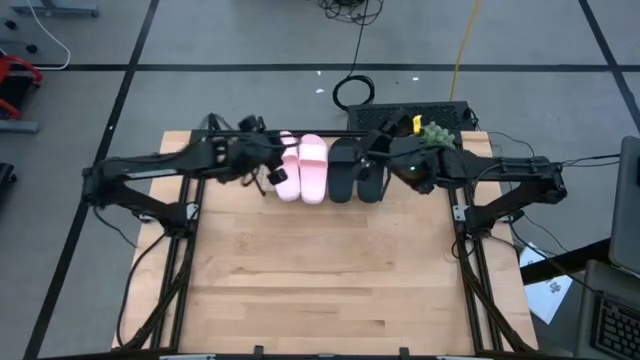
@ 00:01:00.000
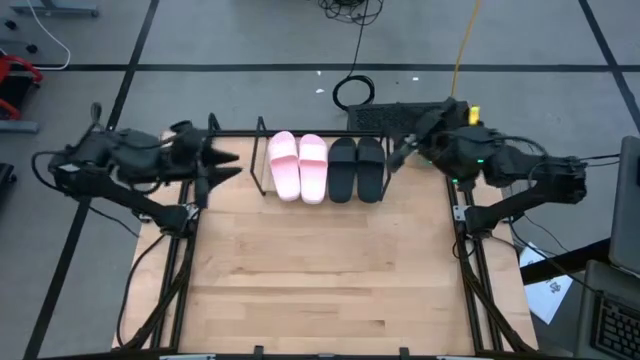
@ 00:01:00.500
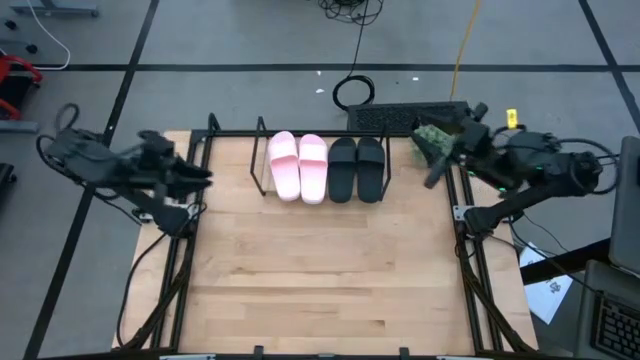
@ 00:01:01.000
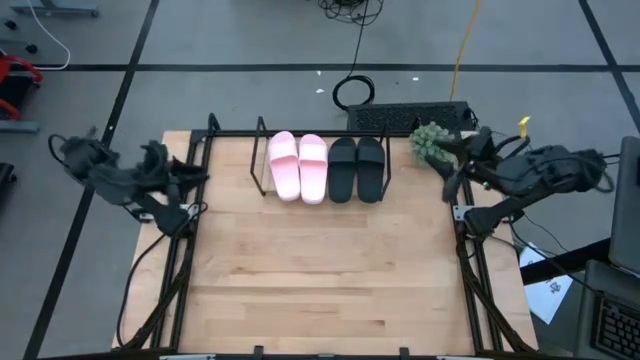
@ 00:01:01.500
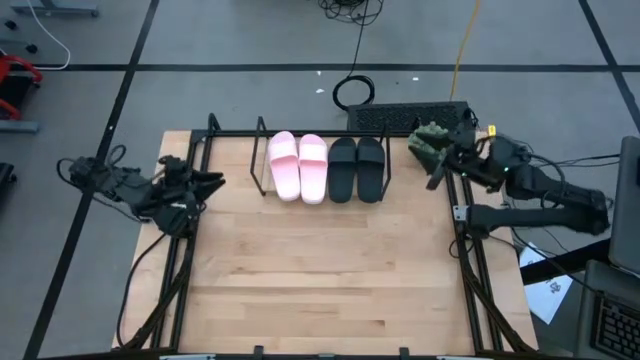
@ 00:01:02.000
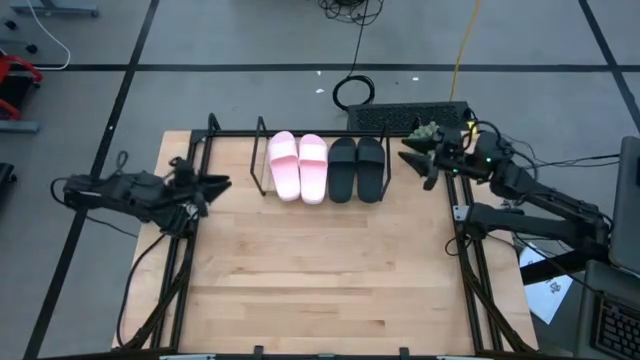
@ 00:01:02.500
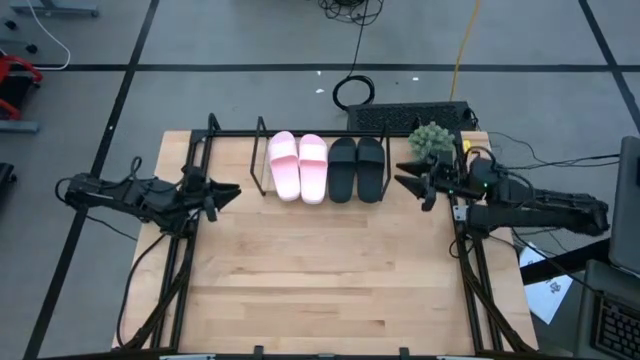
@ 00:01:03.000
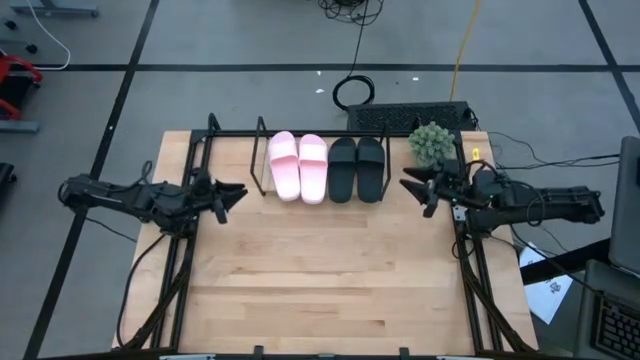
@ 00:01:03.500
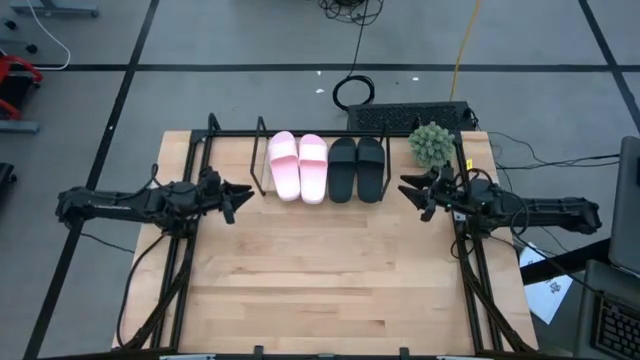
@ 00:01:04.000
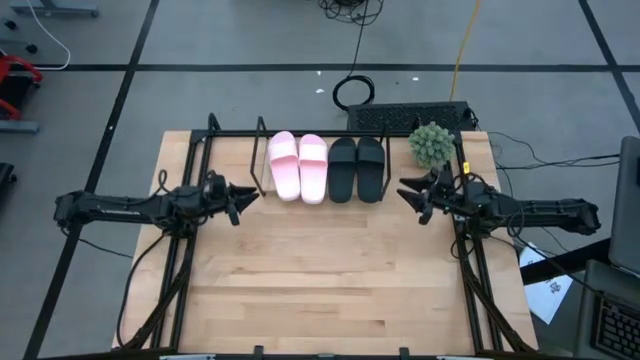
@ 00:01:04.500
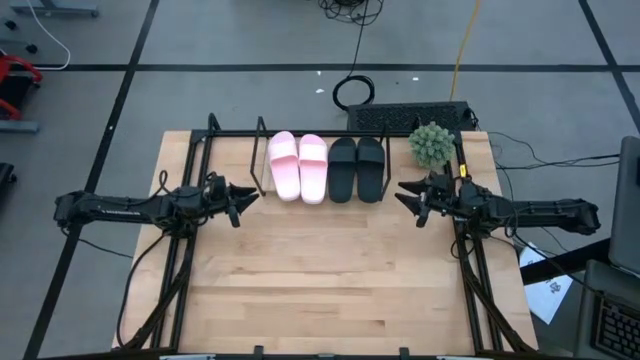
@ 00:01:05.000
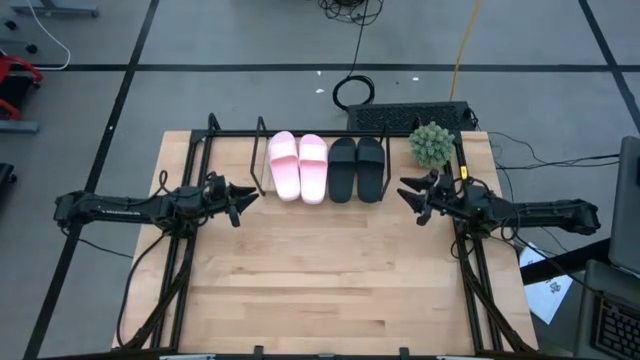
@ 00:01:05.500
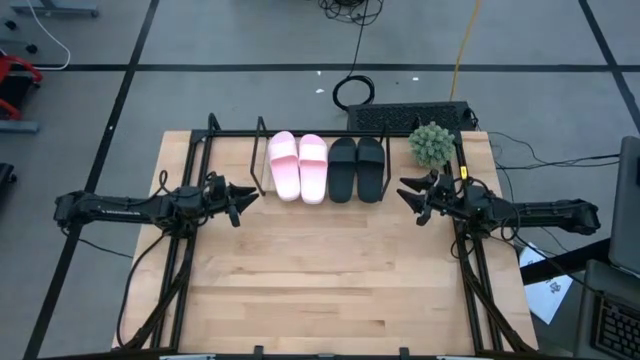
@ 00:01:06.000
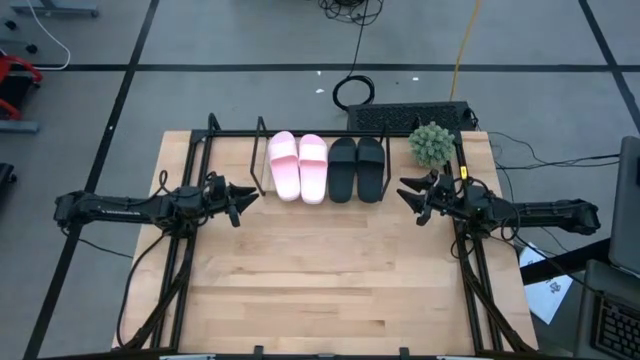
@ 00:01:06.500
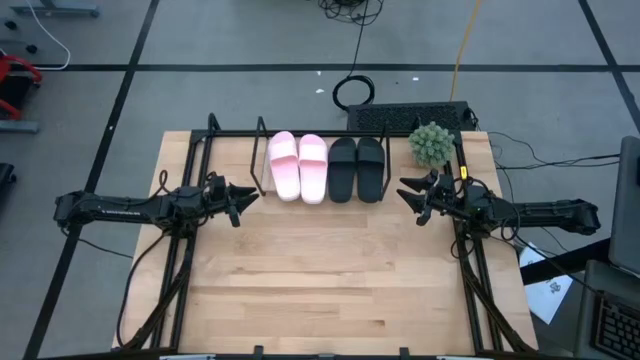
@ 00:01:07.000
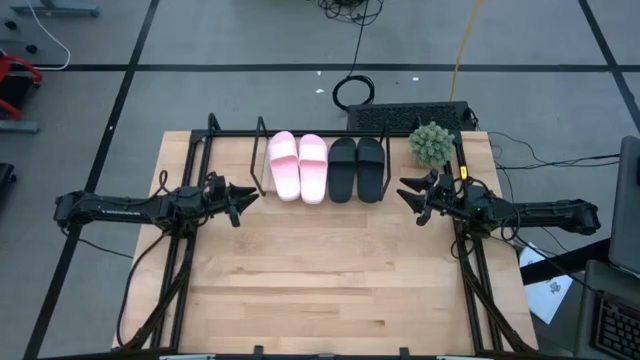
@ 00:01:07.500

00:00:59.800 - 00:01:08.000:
Task: Pick and place slides into the shelf
Return to Home Position

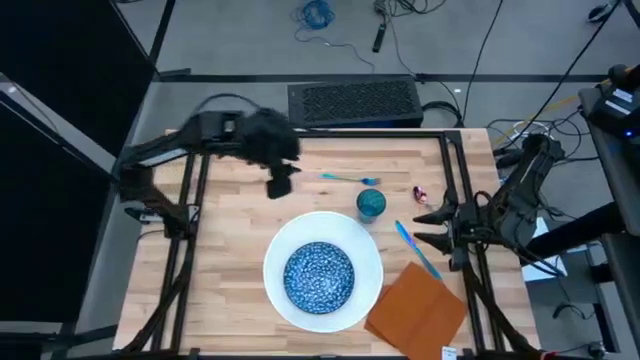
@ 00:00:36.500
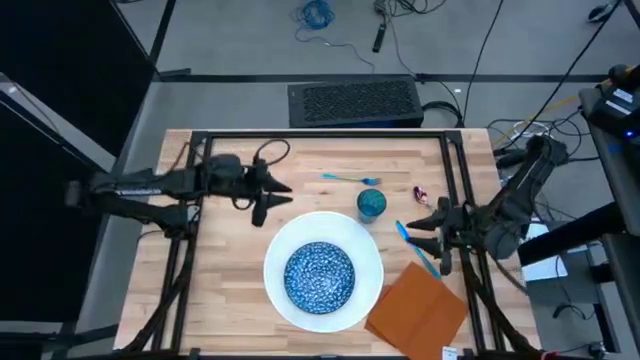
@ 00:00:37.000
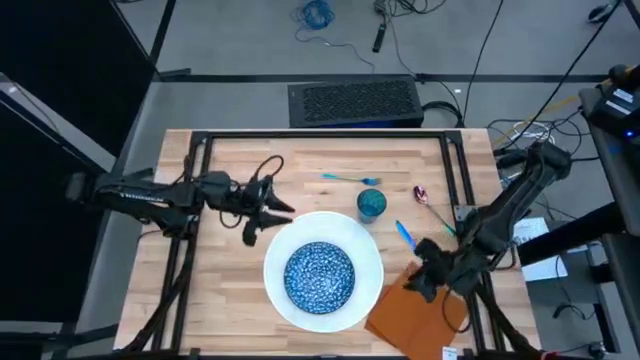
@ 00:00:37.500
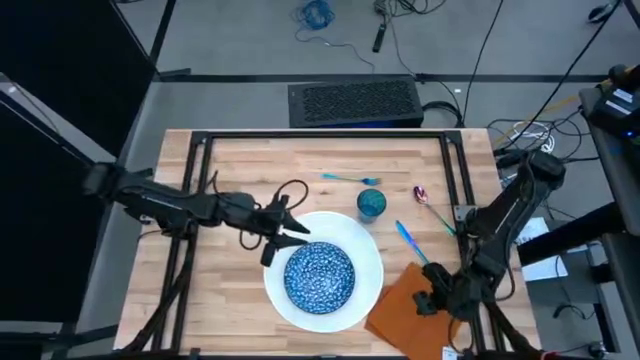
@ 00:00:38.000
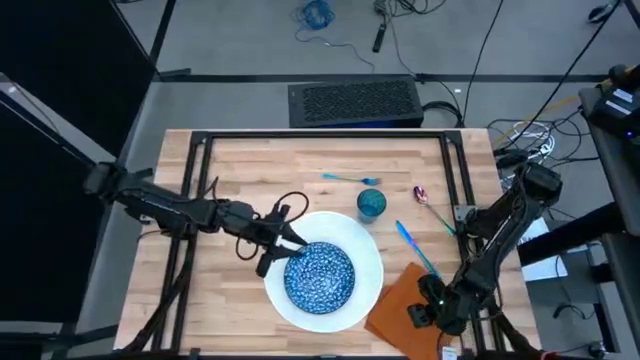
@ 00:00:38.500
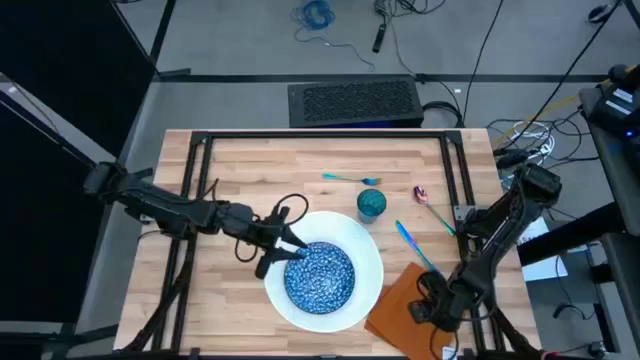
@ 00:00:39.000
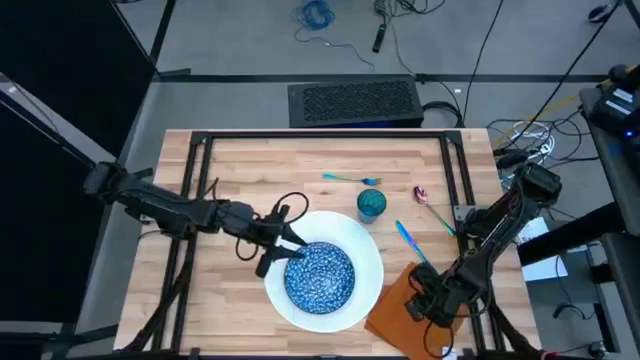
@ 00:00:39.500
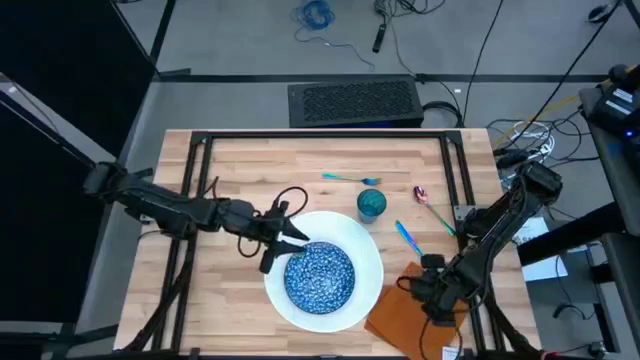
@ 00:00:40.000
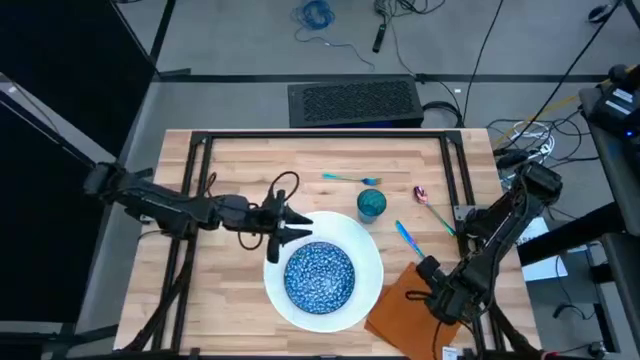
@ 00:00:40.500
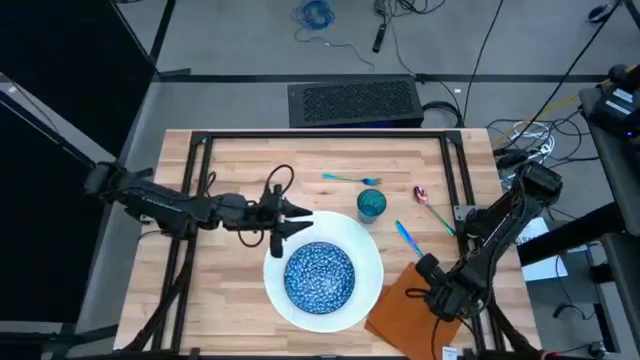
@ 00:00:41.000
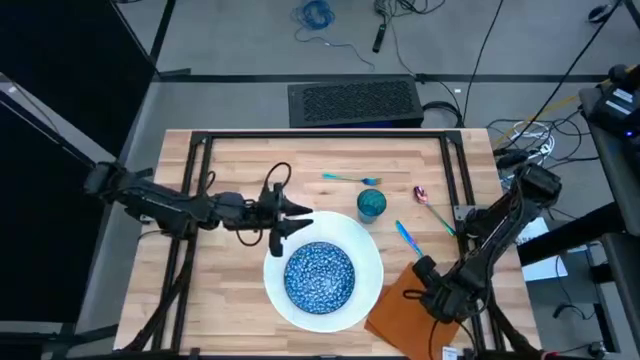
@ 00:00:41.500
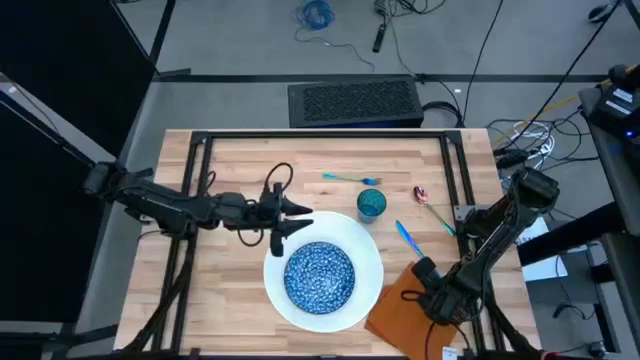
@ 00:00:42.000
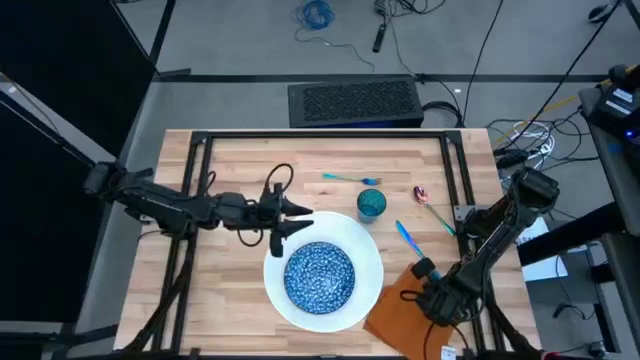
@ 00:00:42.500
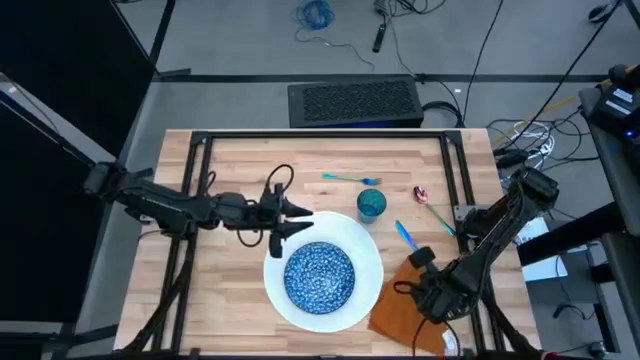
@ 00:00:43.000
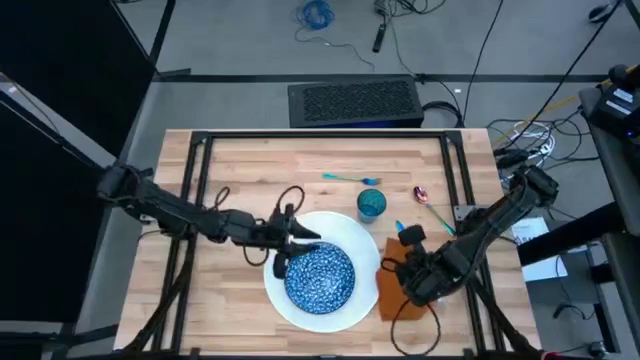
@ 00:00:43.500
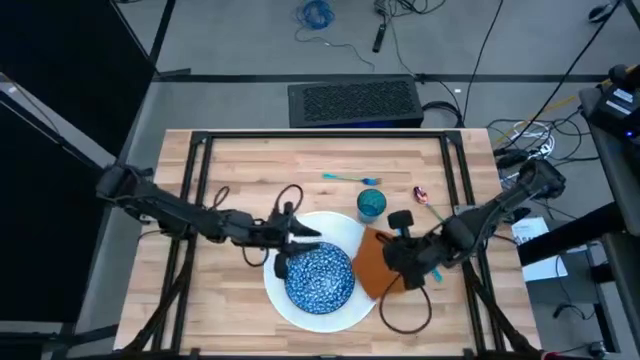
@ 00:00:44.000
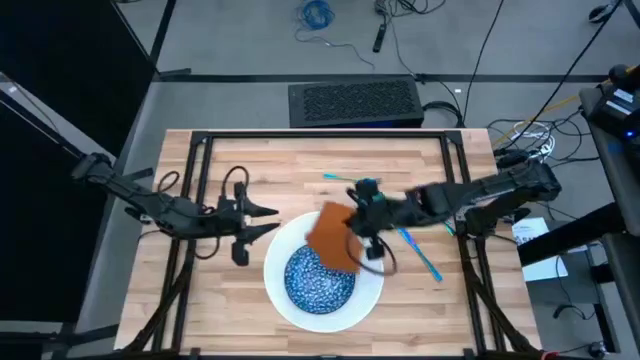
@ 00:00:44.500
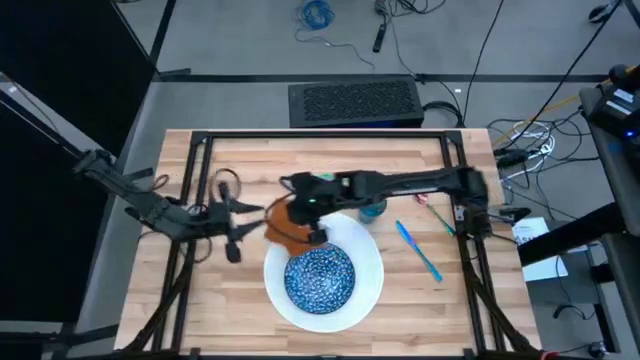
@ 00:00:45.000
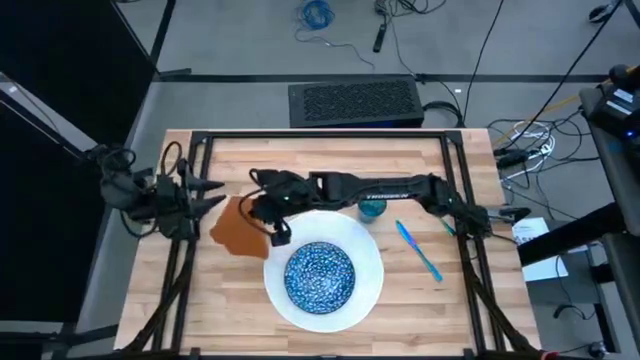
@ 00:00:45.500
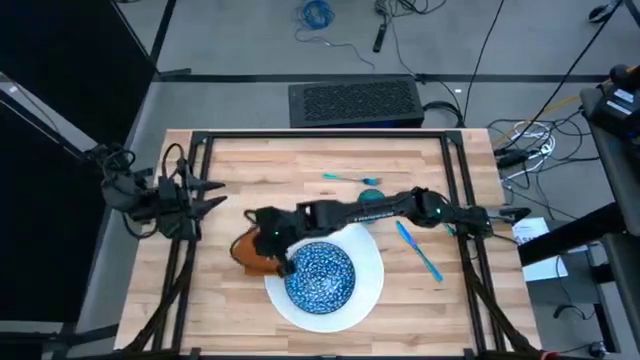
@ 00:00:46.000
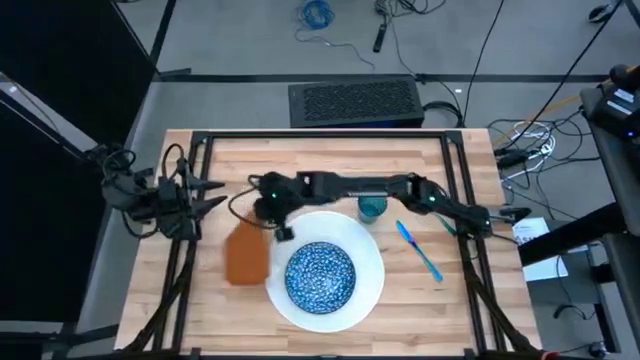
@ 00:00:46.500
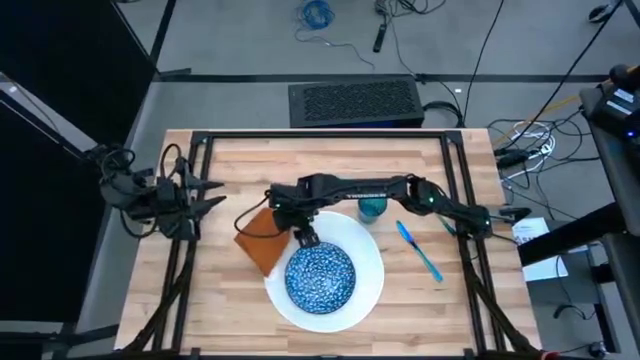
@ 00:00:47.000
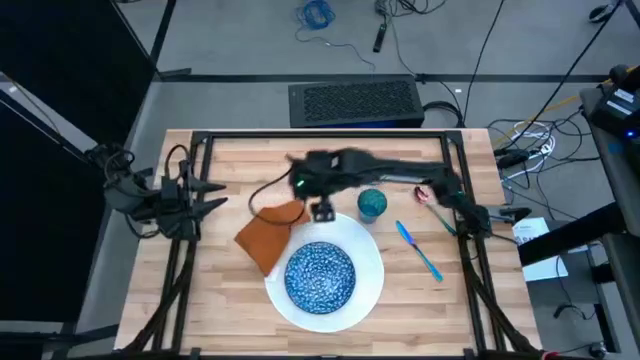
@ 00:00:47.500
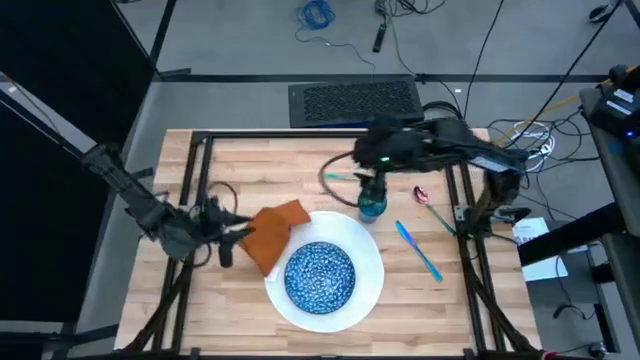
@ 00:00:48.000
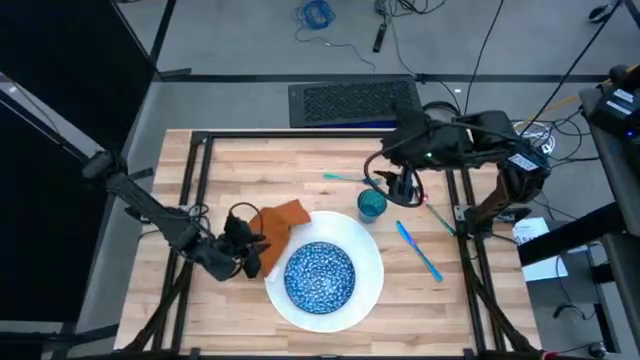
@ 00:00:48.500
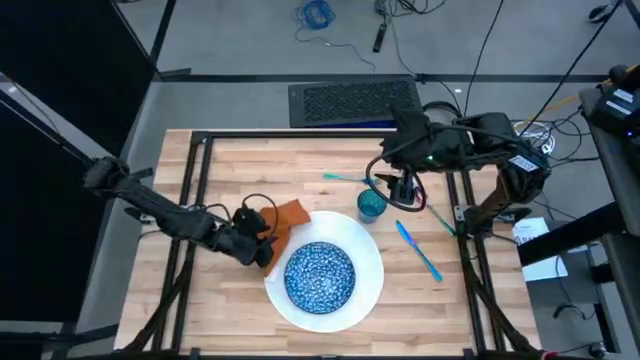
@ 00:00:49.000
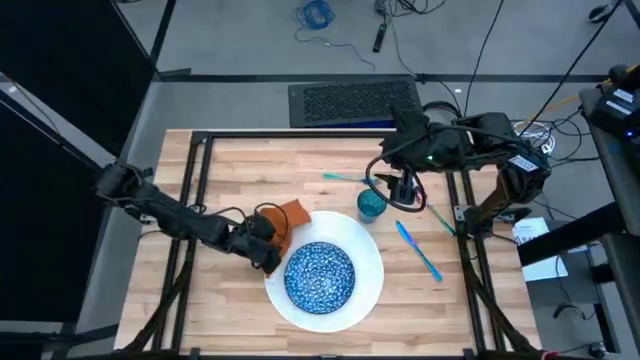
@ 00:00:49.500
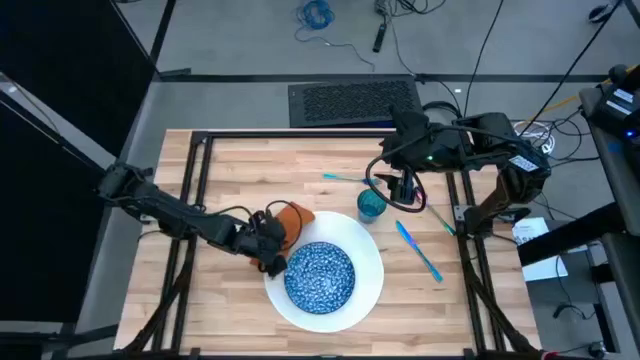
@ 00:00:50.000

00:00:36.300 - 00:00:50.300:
Task: Set table place
Fold the brown table napkin
